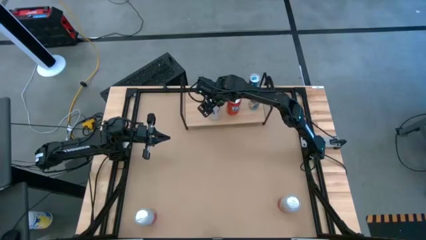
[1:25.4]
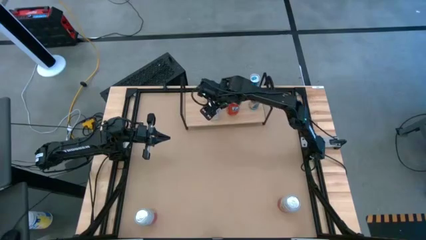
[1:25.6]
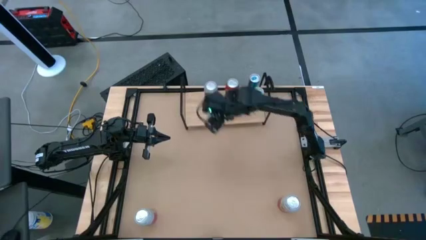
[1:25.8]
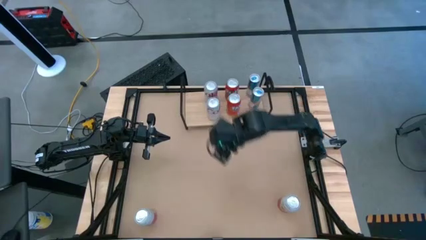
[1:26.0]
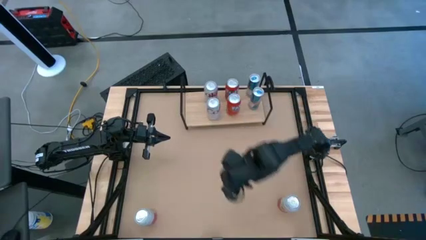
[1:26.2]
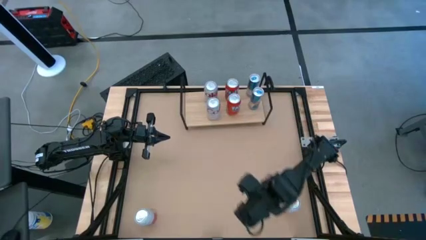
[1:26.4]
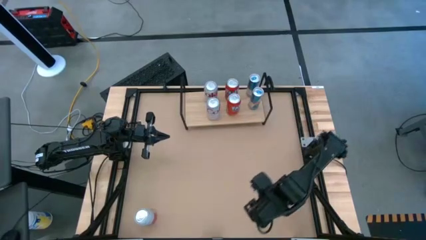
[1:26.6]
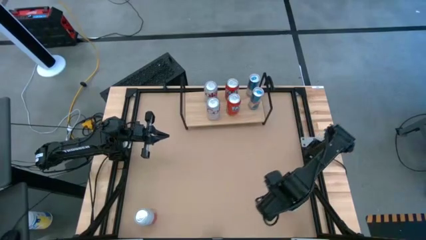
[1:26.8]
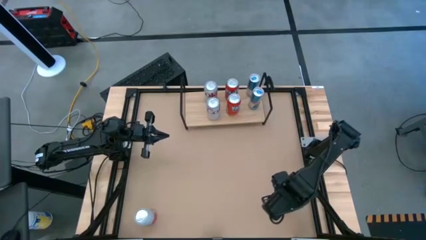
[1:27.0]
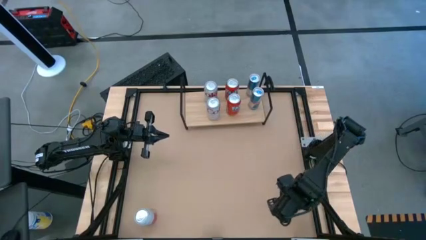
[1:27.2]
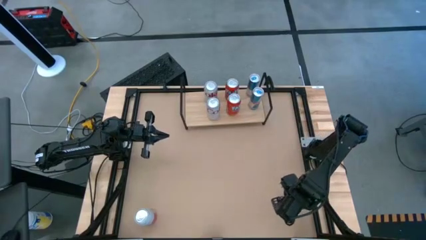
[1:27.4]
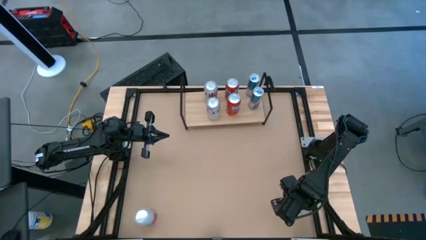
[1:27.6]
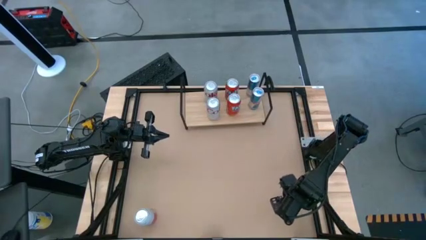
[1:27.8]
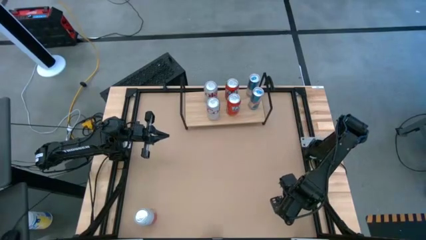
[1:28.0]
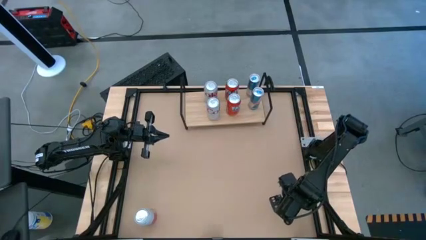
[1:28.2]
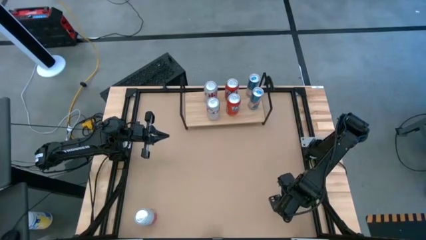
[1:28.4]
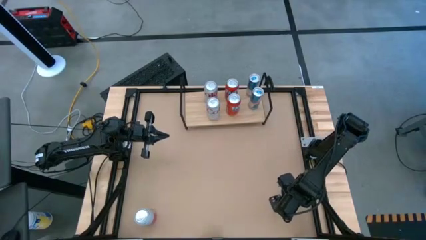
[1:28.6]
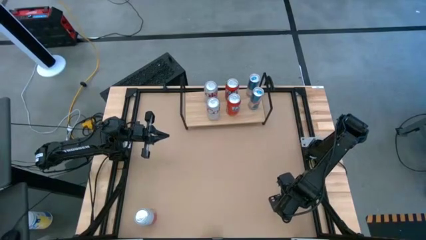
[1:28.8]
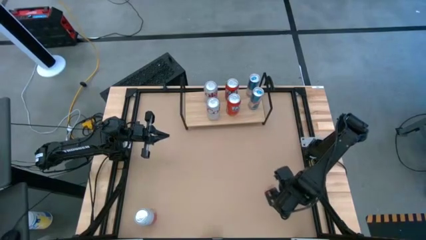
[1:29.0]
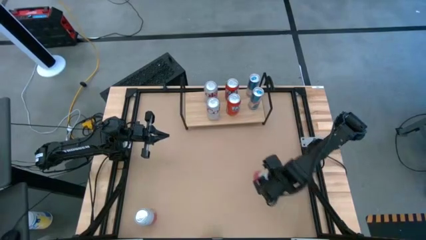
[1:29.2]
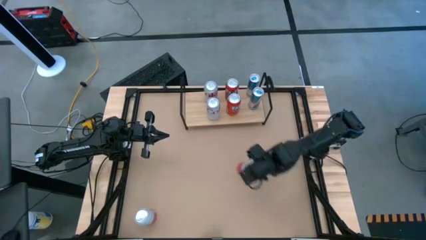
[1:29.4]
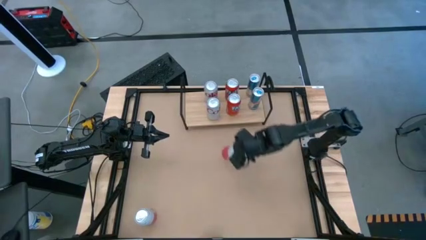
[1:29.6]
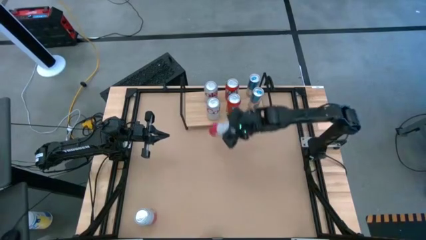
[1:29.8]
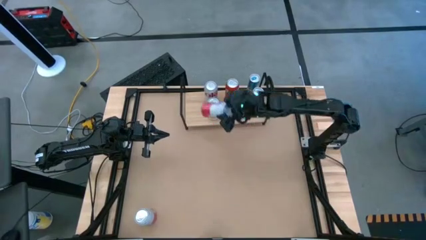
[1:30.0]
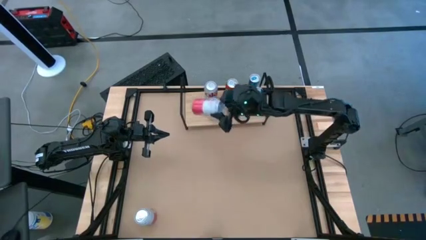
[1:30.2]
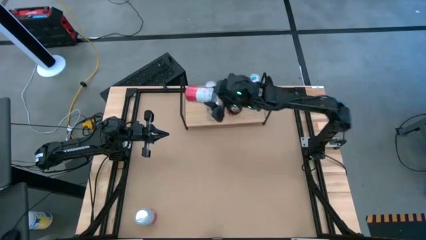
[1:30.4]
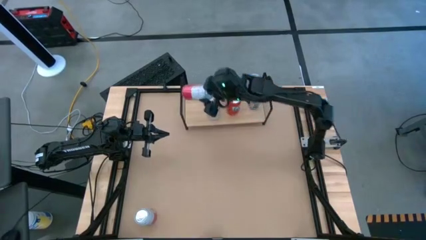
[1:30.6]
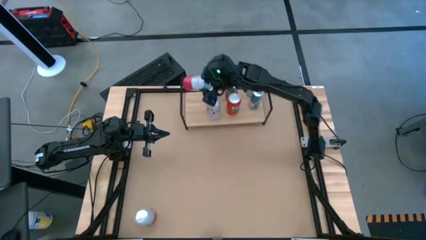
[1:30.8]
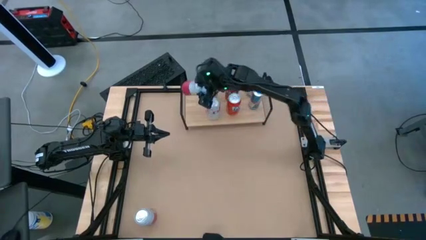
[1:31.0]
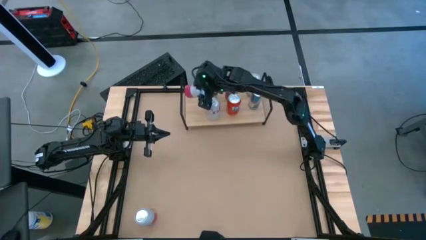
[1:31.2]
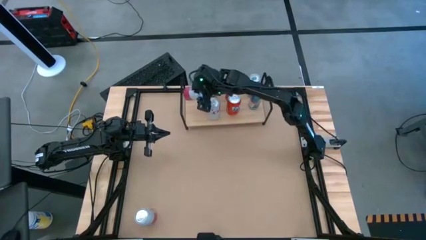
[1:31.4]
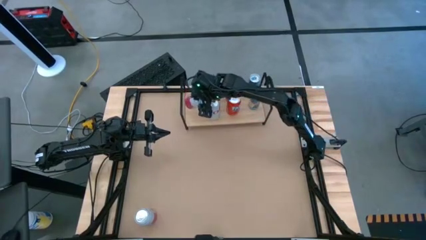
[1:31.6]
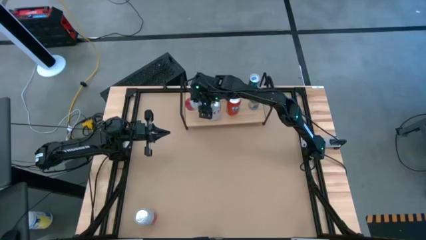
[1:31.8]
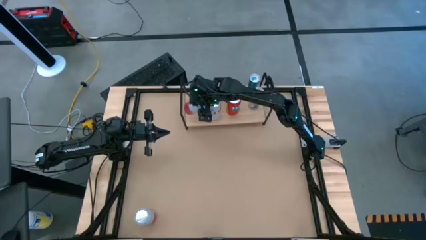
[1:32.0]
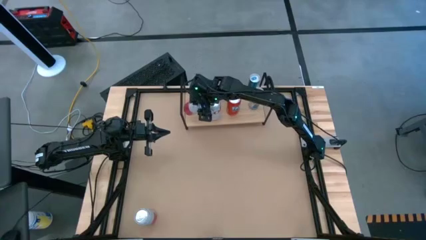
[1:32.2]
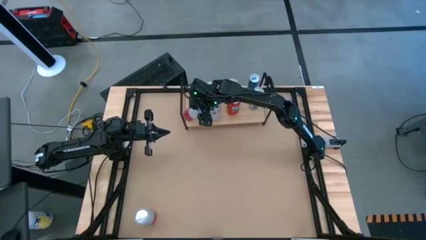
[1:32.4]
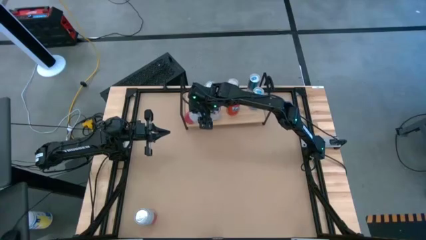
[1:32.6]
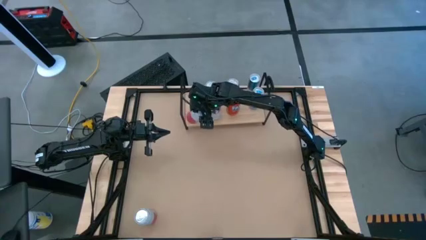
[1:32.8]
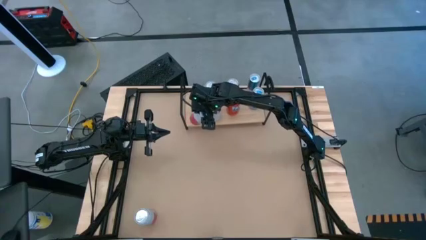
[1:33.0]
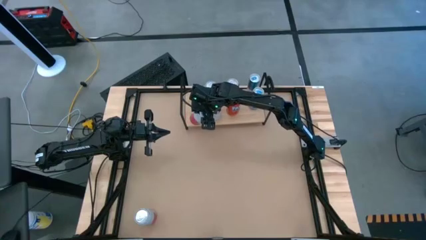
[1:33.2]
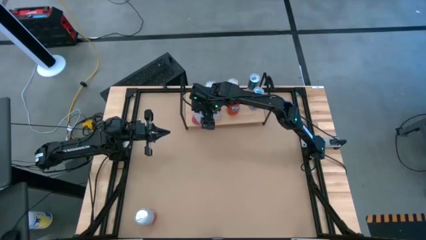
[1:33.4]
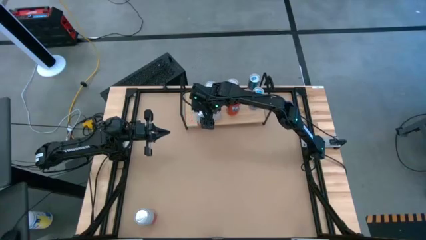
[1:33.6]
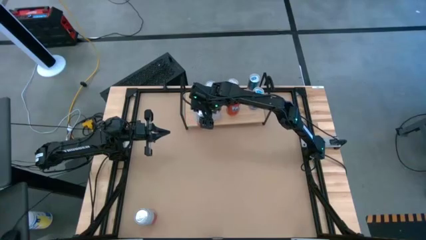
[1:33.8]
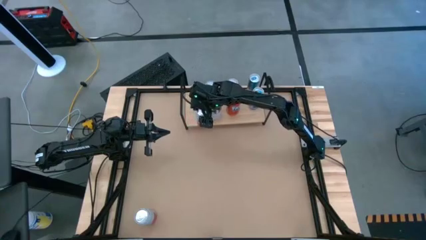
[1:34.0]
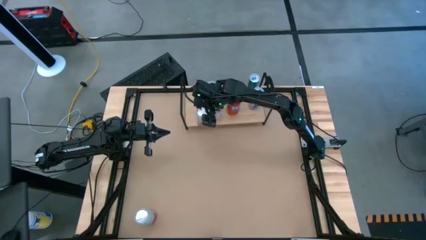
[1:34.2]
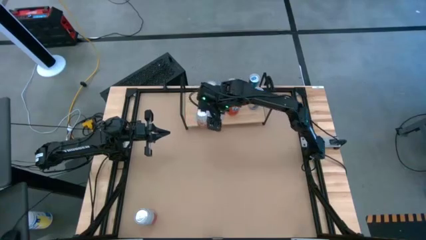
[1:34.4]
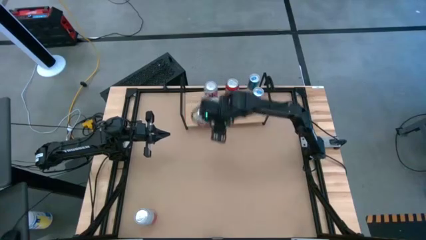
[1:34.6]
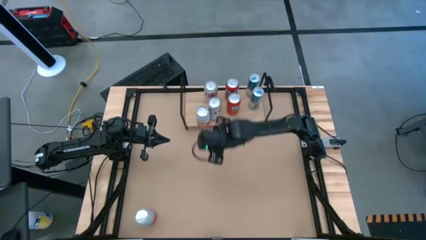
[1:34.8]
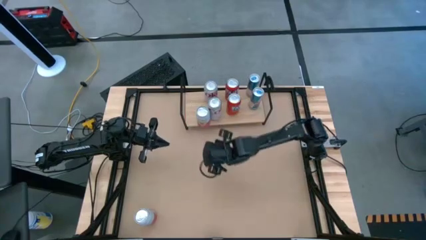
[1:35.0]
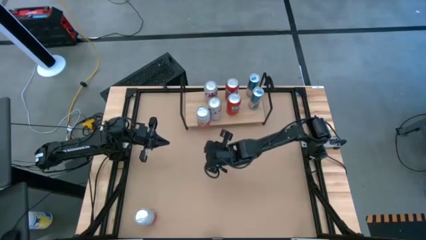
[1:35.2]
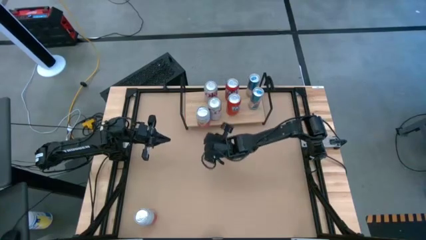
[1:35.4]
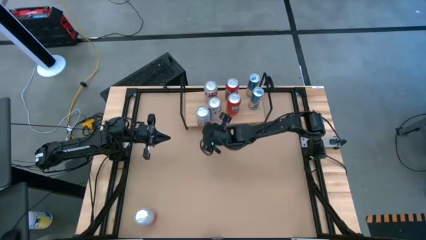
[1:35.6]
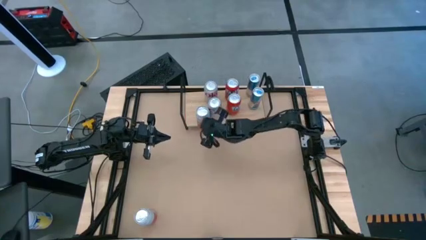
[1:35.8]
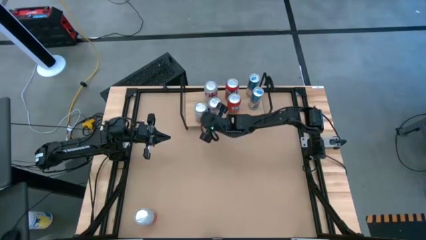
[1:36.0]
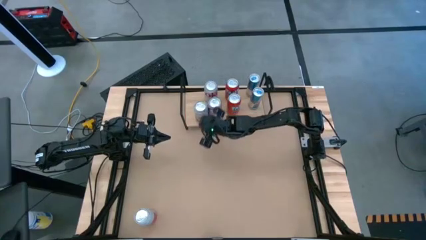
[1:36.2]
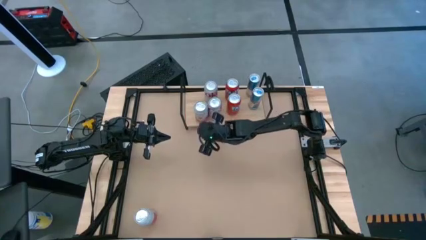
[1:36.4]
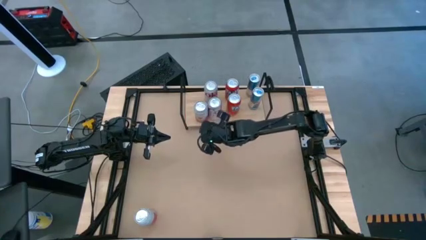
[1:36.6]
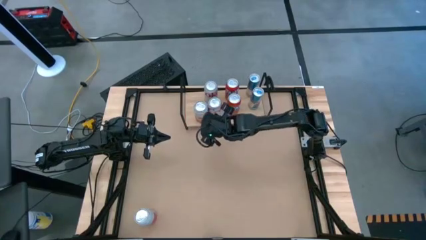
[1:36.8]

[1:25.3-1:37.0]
Task: Place canned beverage on shelf
Put the right pink and white soda can on the shelf

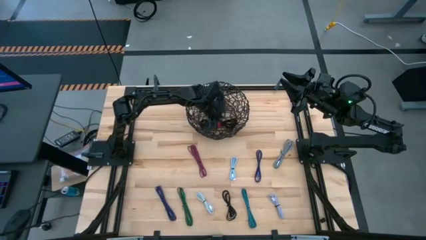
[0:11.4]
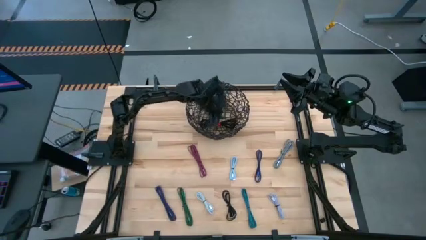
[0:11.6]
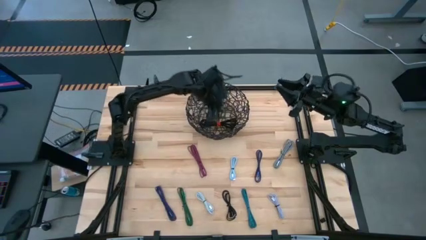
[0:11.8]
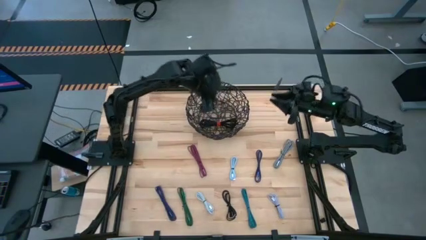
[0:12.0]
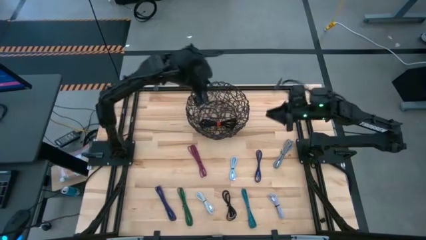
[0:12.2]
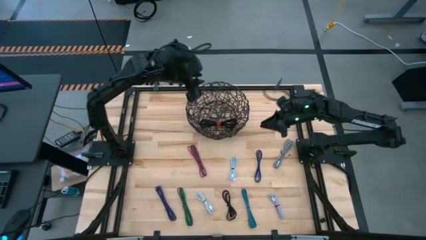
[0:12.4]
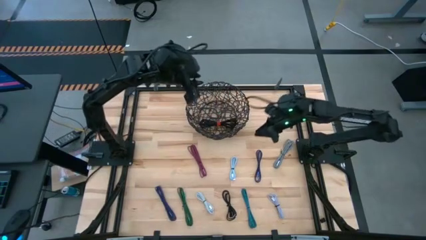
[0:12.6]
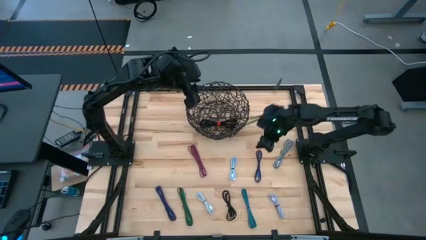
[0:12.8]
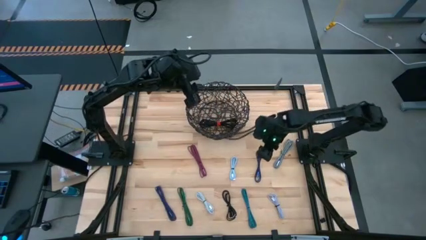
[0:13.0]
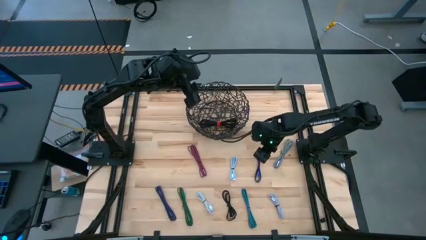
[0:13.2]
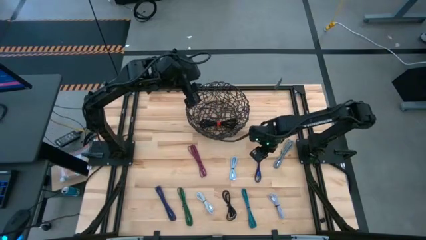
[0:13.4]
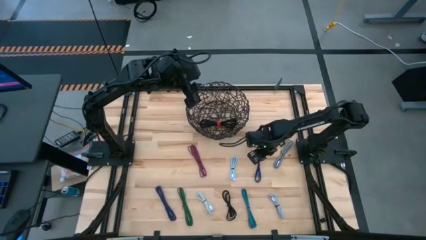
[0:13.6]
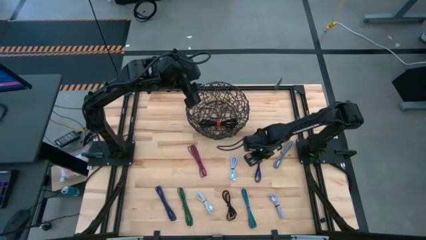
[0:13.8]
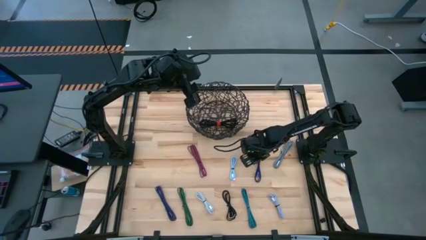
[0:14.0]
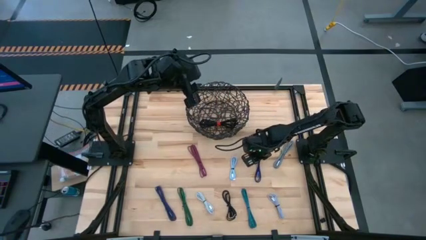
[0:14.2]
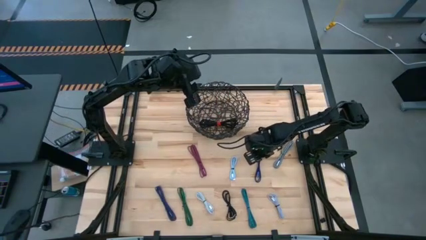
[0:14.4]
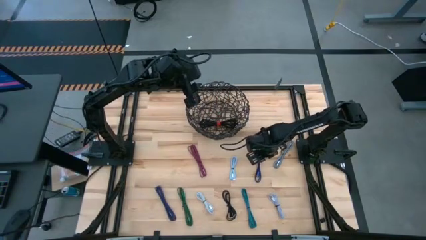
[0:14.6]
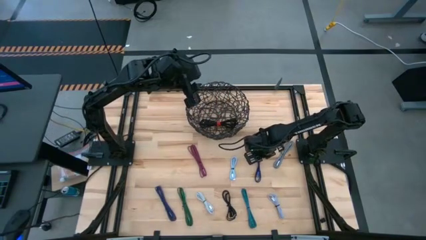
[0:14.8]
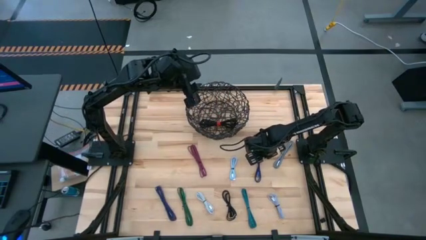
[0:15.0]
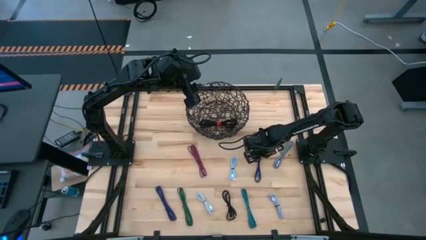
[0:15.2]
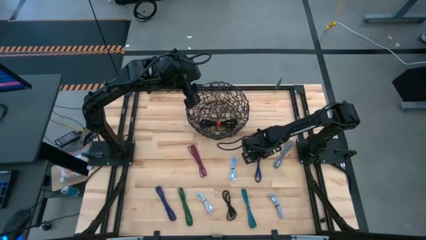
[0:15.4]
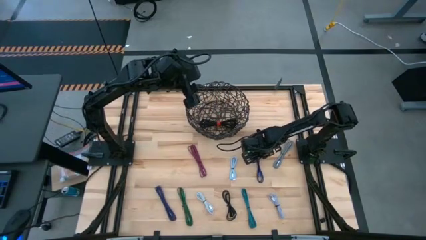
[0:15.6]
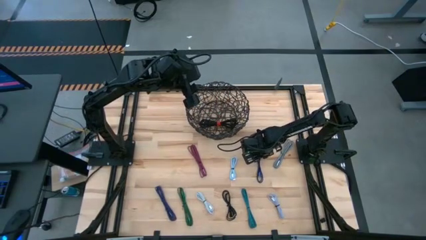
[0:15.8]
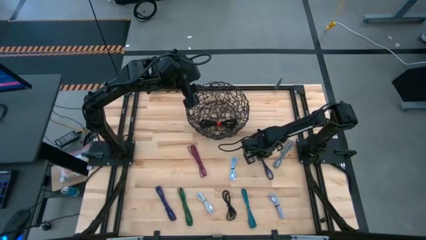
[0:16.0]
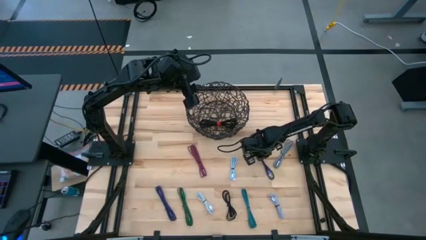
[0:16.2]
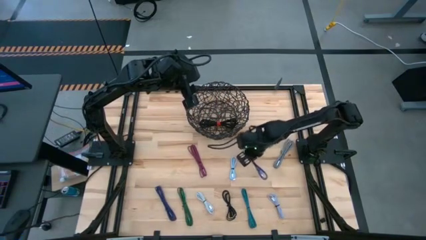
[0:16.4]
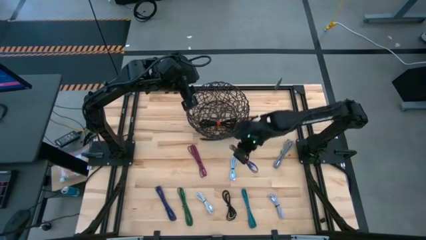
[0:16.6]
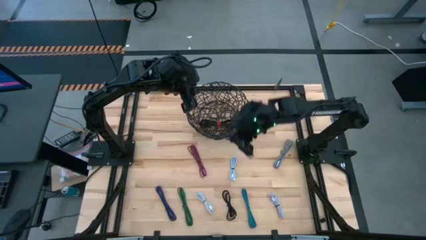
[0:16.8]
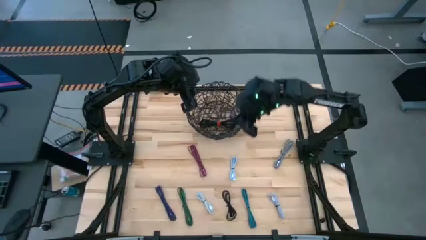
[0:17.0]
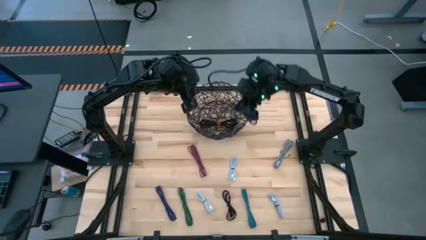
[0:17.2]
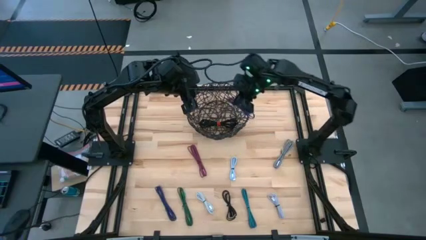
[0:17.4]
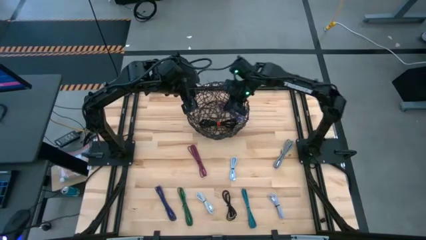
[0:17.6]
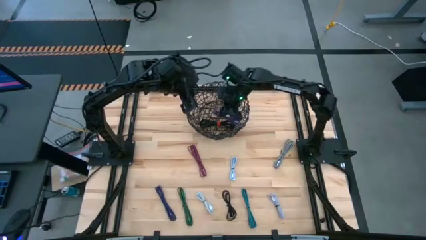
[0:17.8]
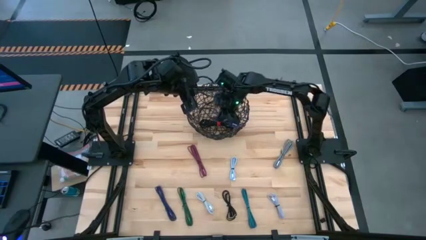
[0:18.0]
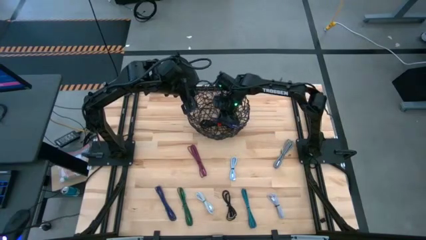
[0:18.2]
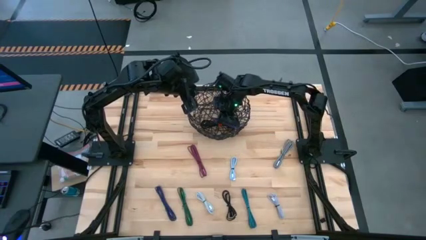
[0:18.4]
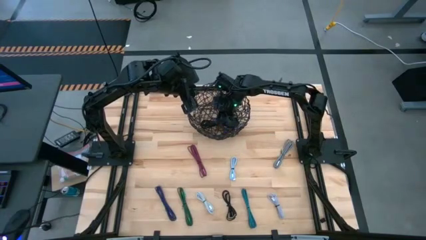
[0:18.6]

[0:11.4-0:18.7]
Task: Pick and place USB-C Cables
Put the violet charger cable into the black mesh basket
